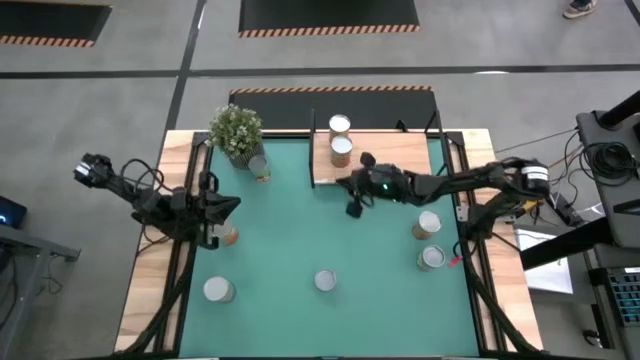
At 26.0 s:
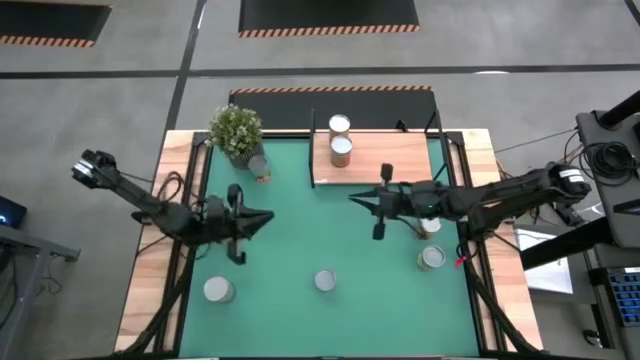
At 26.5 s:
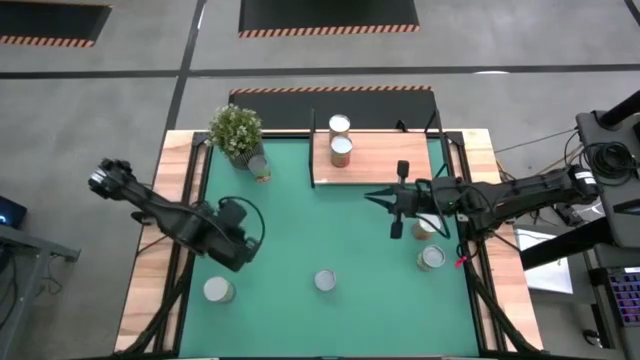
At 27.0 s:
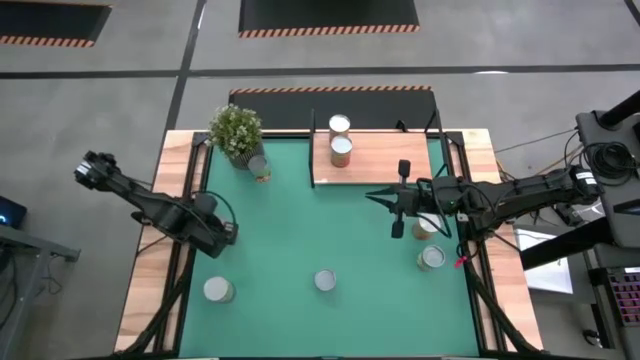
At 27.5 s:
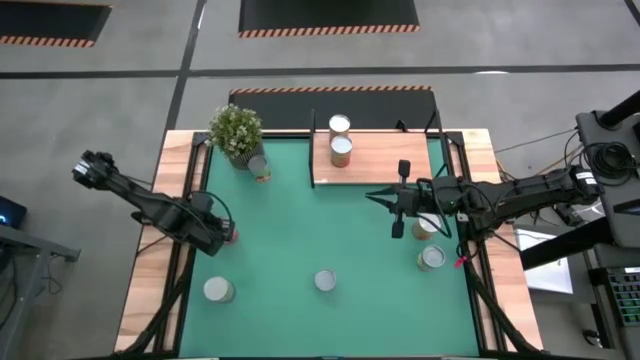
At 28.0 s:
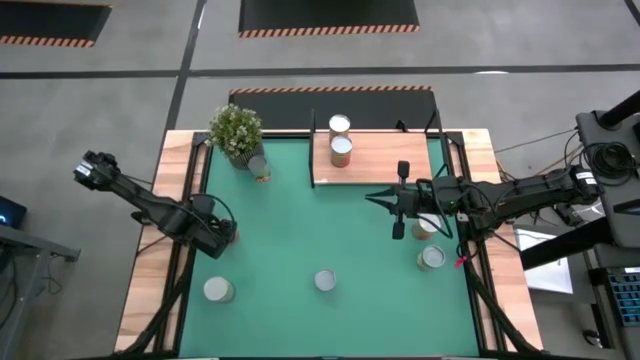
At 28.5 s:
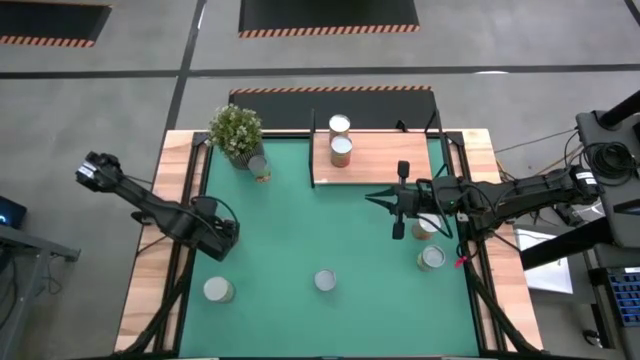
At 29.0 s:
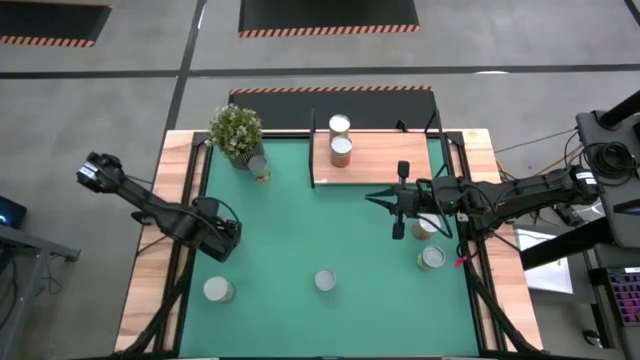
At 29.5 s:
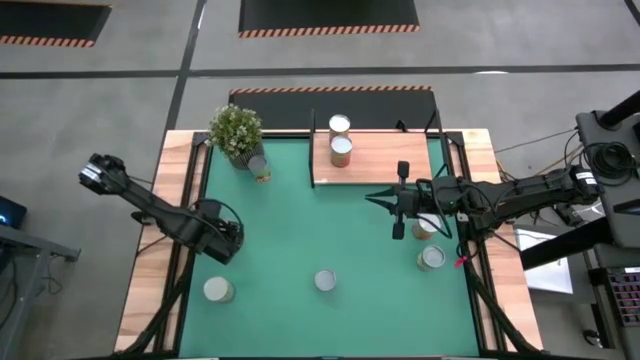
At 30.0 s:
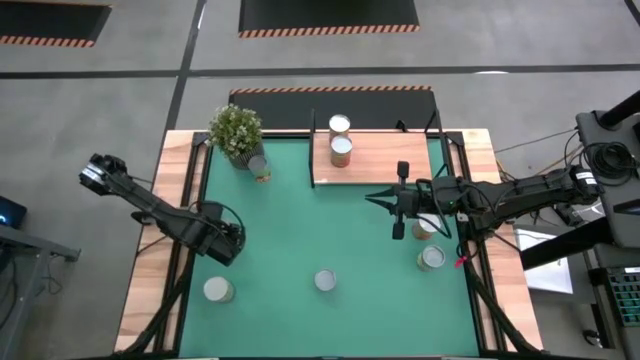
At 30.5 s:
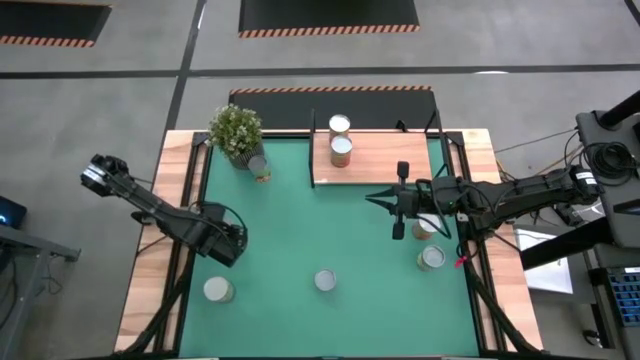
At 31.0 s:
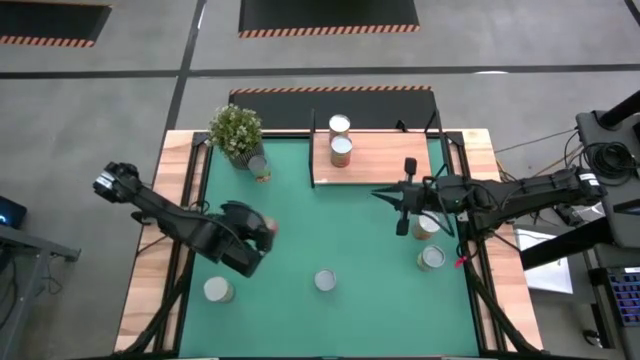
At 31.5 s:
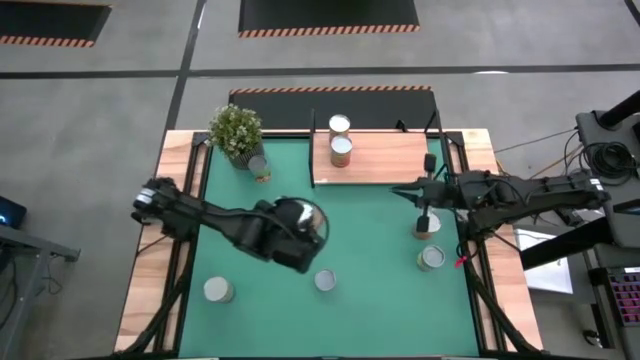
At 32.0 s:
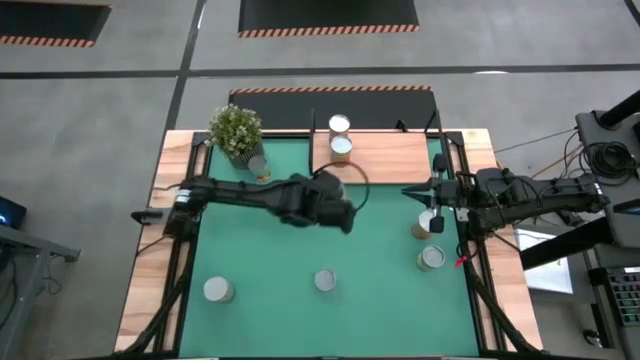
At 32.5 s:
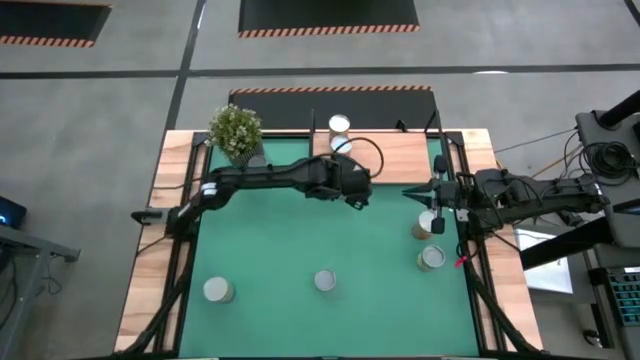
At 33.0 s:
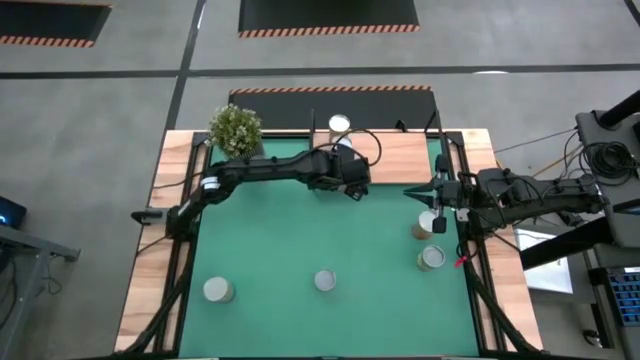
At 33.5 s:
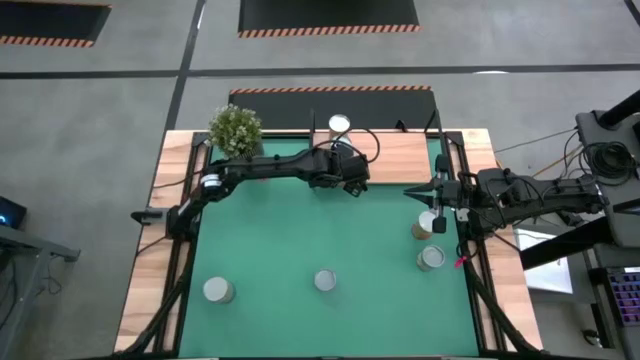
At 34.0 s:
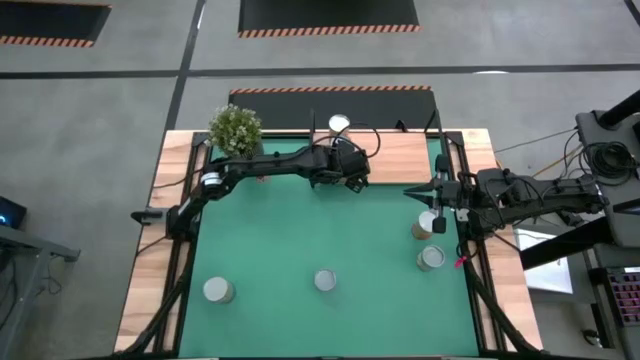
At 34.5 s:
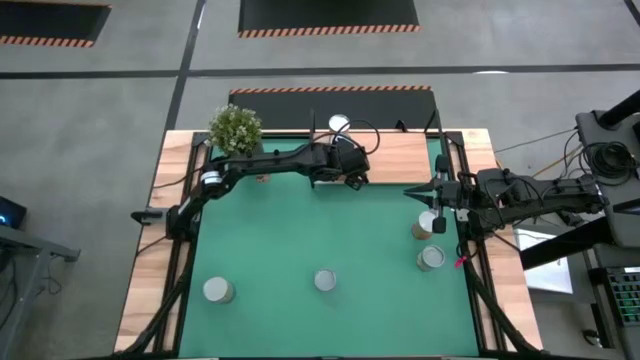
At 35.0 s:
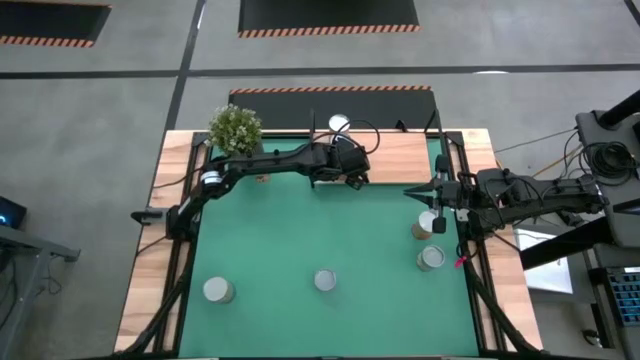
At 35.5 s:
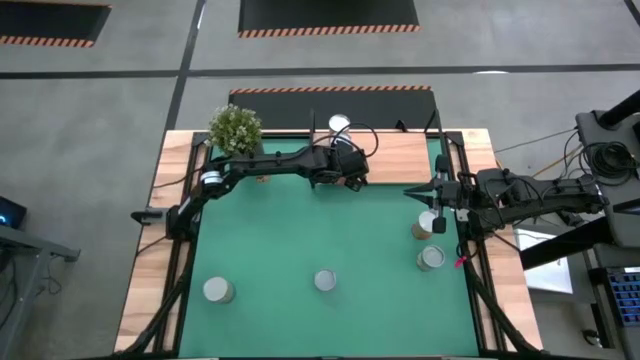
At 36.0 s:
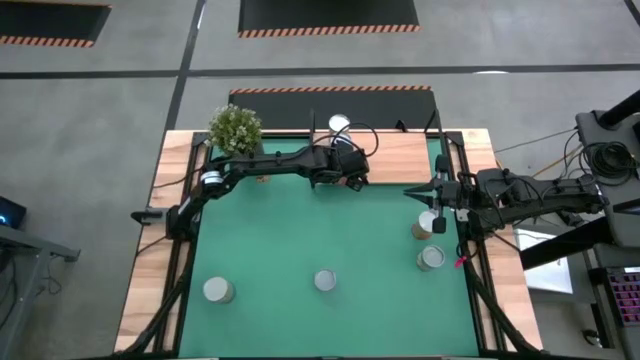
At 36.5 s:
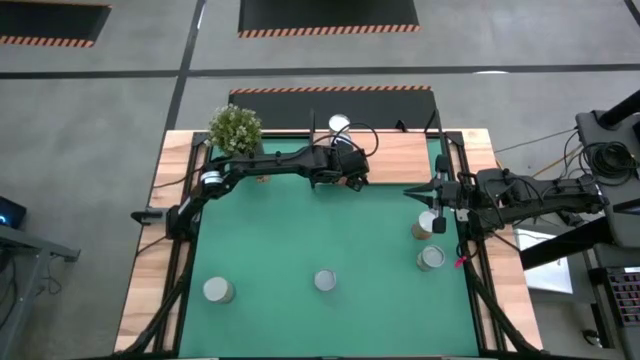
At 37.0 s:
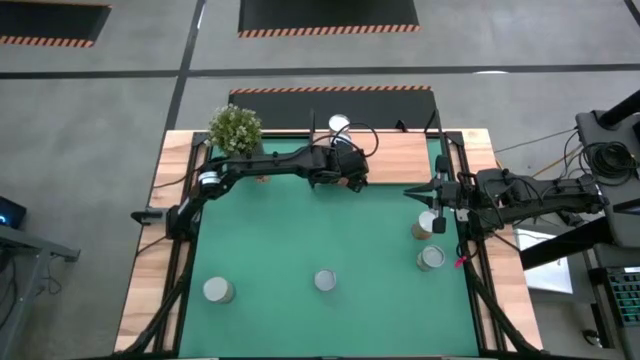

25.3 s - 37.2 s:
Task: Pick and place cans onto a shelf
Put the orange can on the shelf

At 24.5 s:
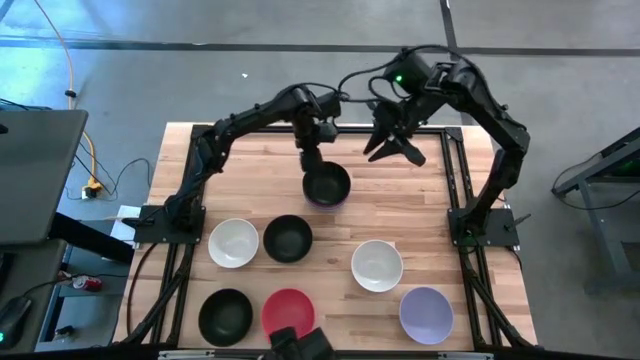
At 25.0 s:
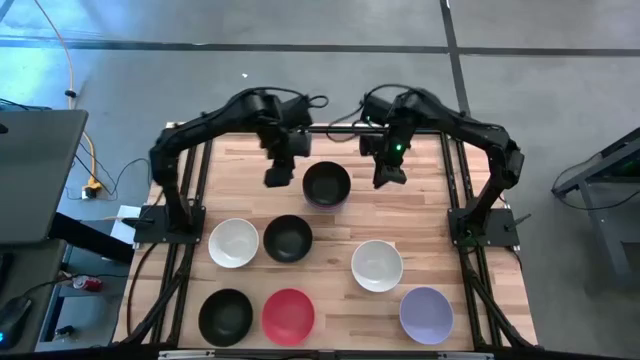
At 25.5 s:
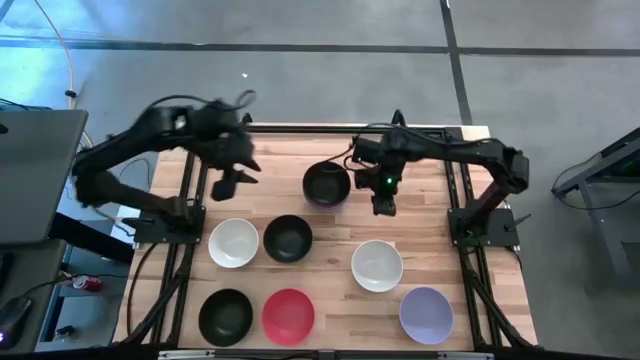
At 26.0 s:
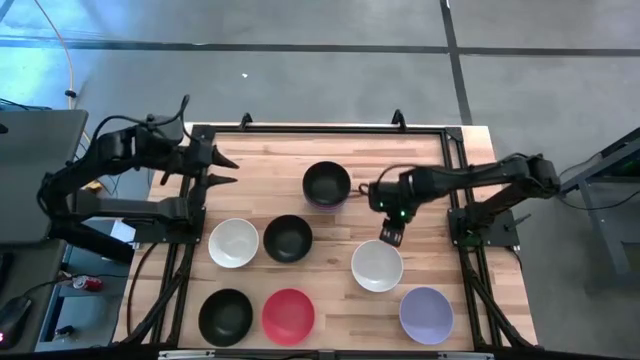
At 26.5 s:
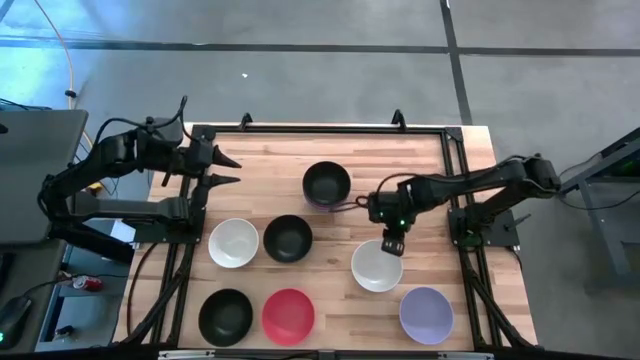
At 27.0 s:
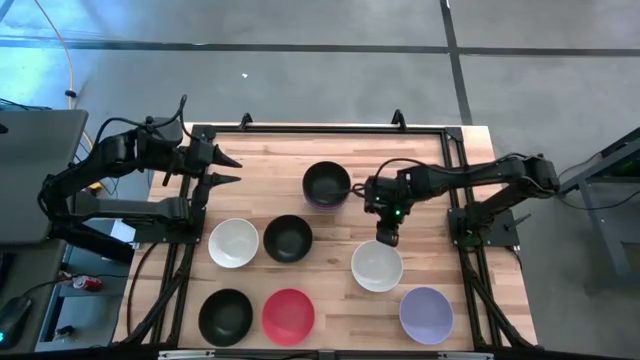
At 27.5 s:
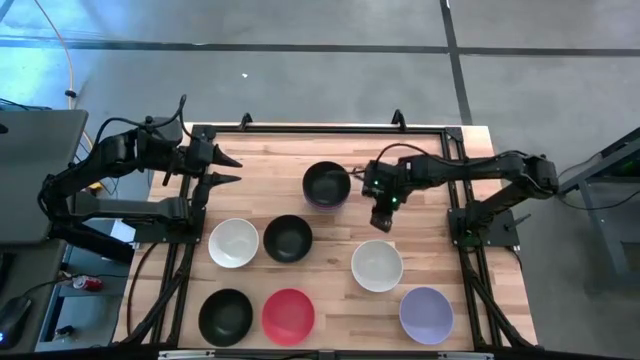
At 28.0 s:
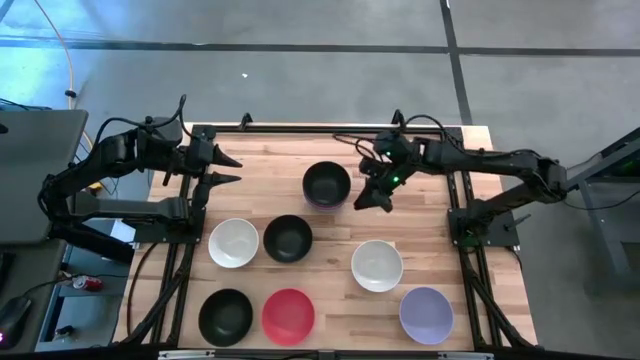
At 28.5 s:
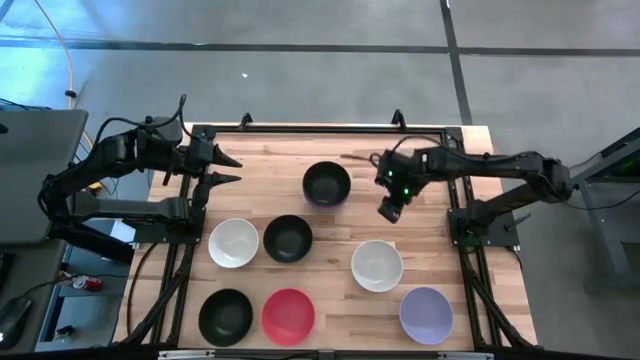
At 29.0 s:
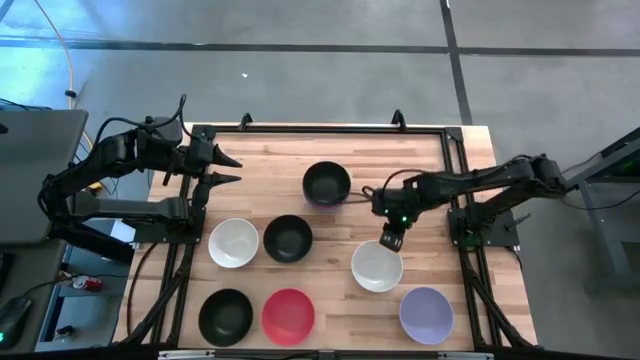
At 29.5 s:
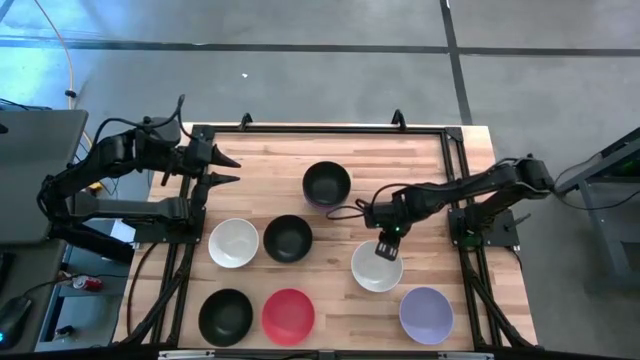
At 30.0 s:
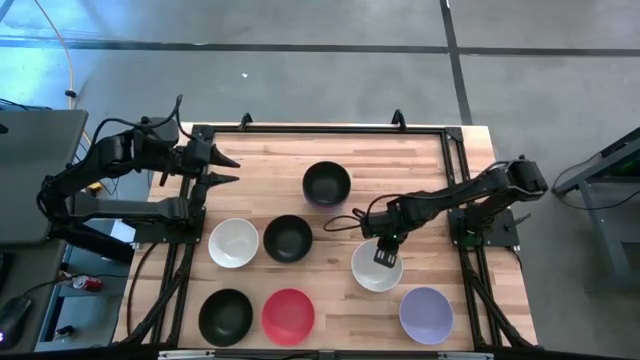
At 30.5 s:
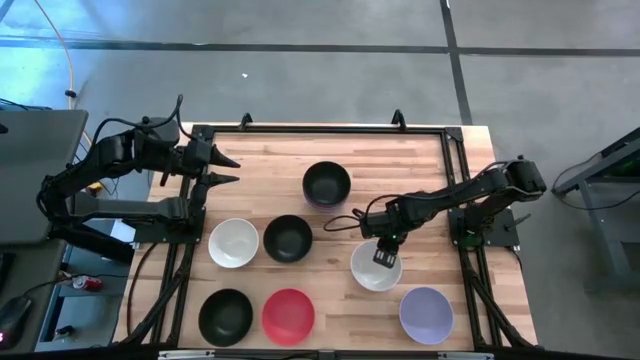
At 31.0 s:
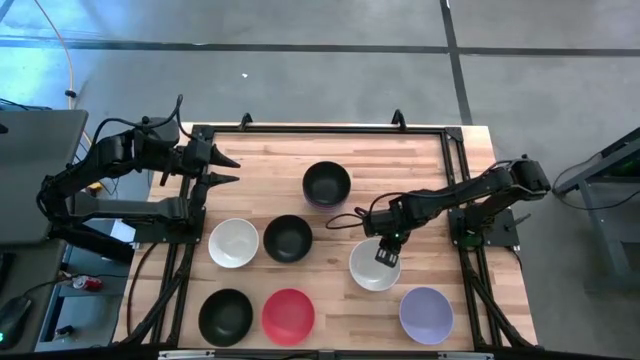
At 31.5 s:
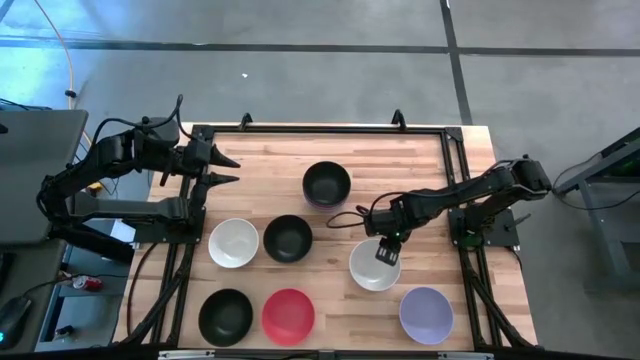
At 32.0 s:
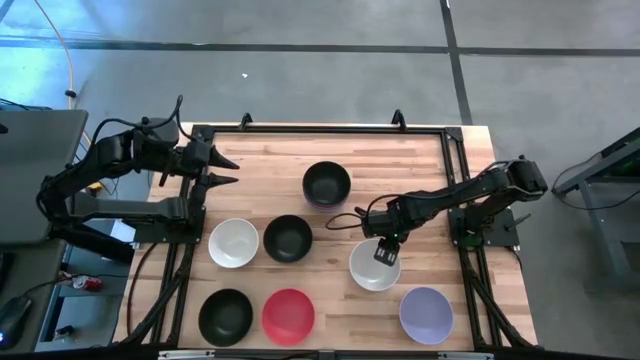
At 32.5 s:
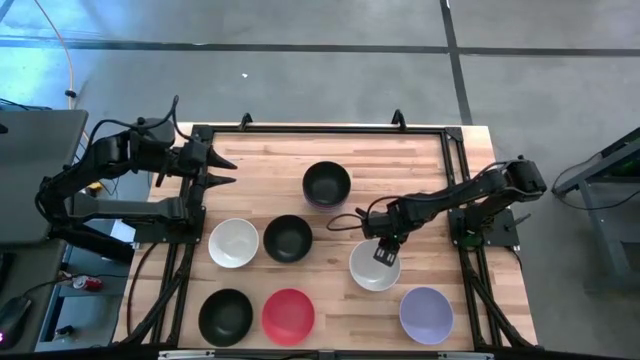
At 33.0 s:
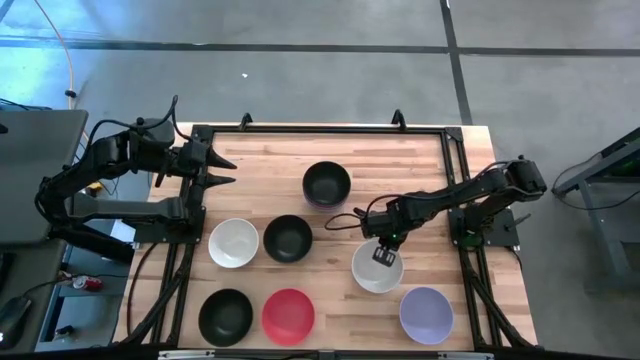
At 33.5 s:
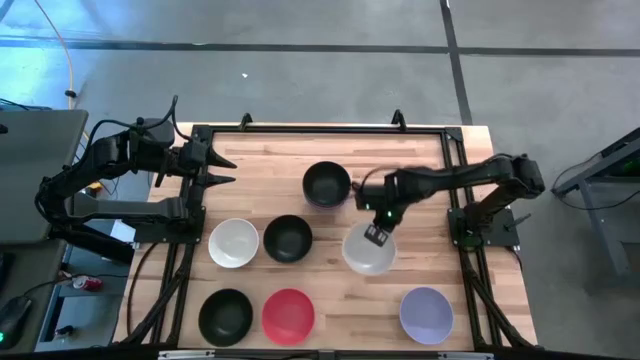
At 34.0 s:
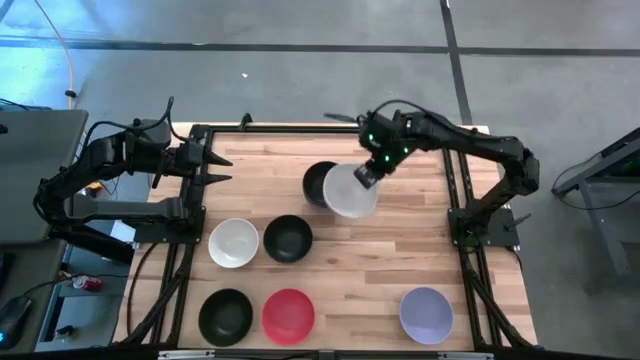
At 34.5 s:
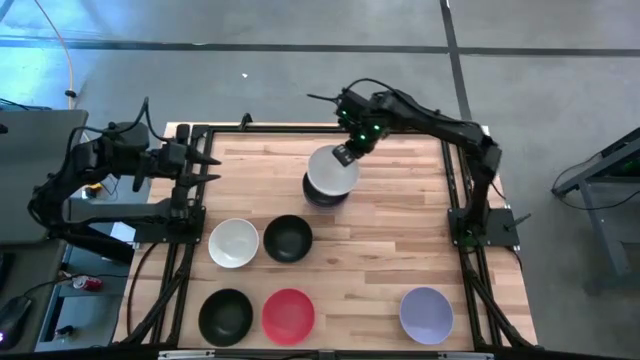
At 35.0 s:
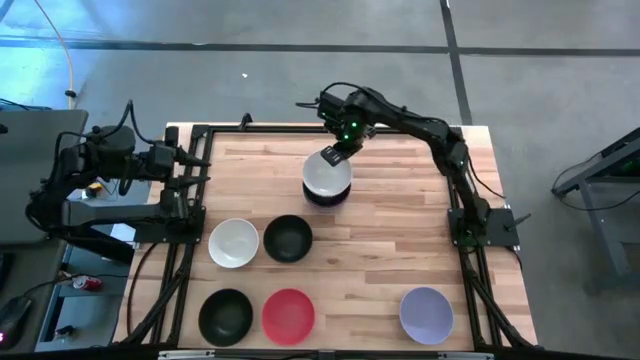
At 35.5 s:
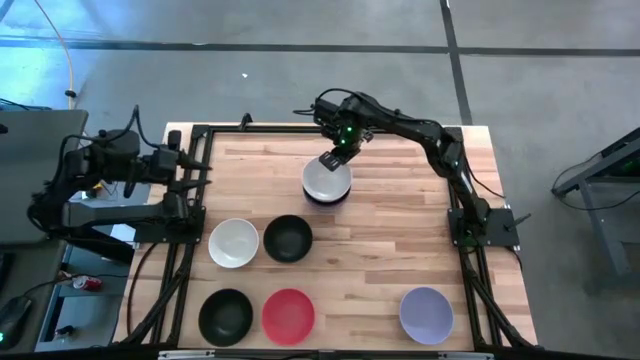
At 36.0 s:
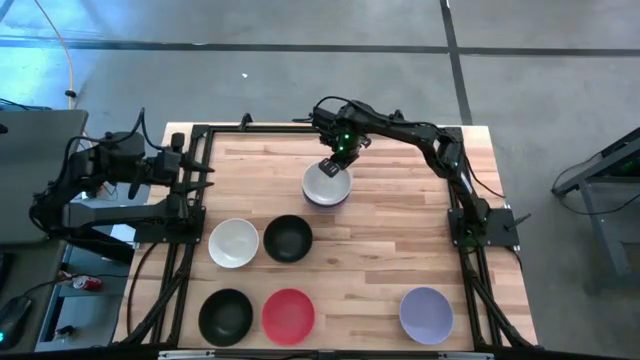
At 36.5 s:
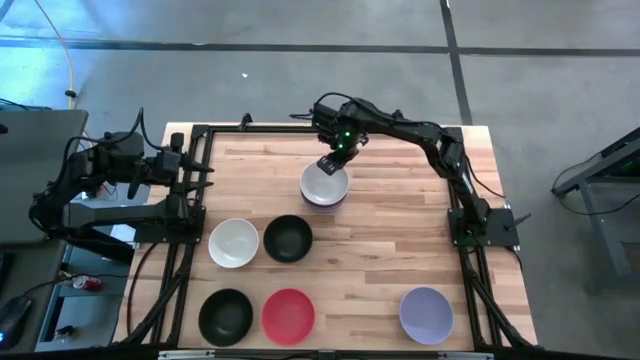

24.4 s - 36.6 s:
Task: Nest bowls inside each other
Stack the right white bowl on top of the black bowl
